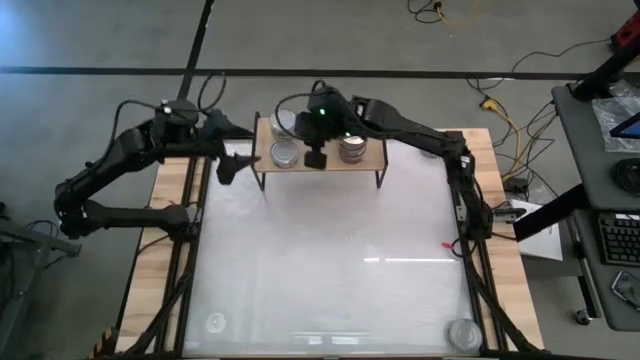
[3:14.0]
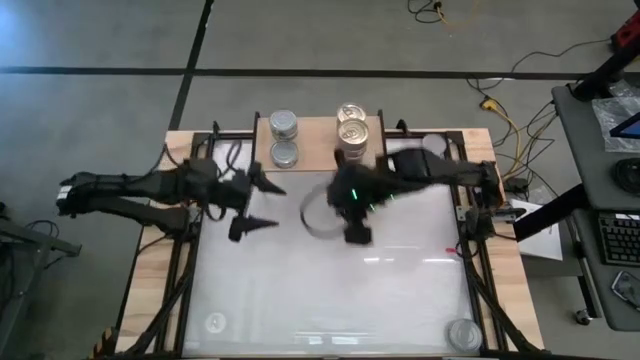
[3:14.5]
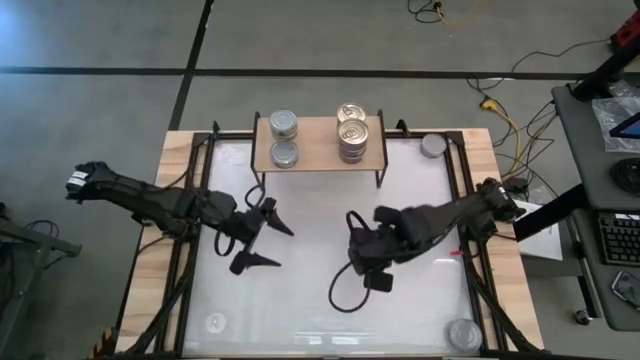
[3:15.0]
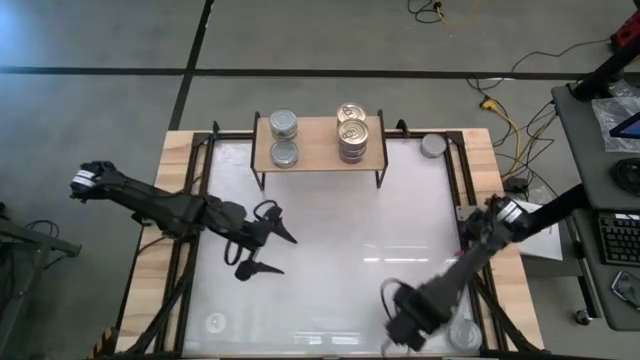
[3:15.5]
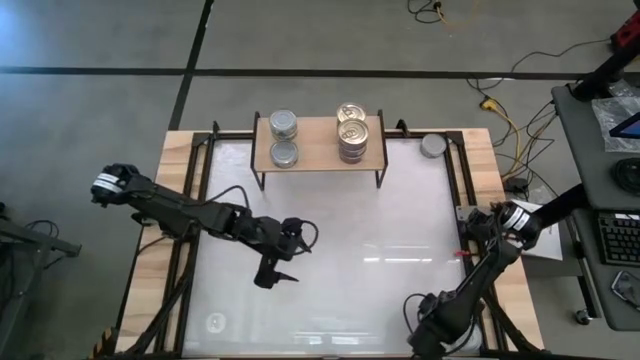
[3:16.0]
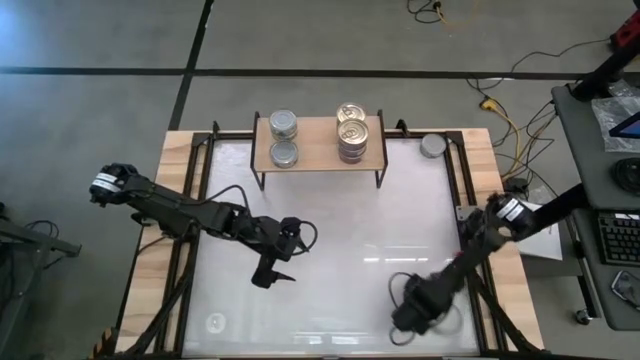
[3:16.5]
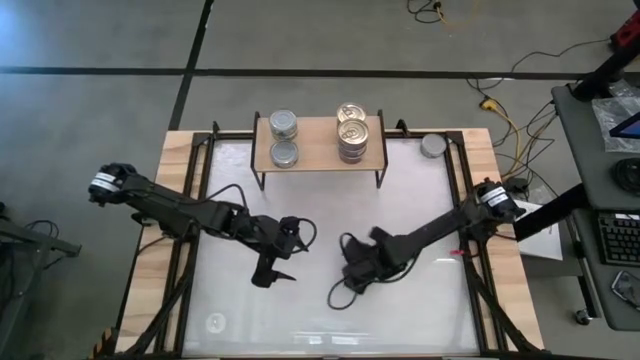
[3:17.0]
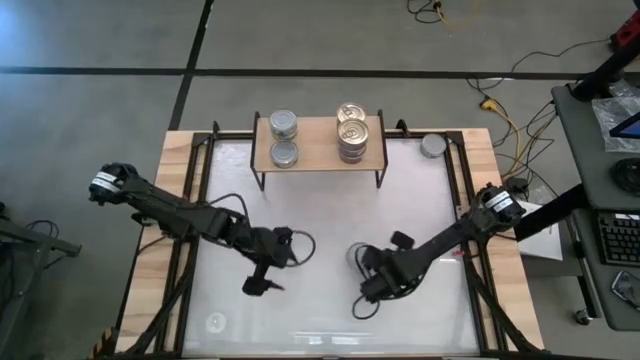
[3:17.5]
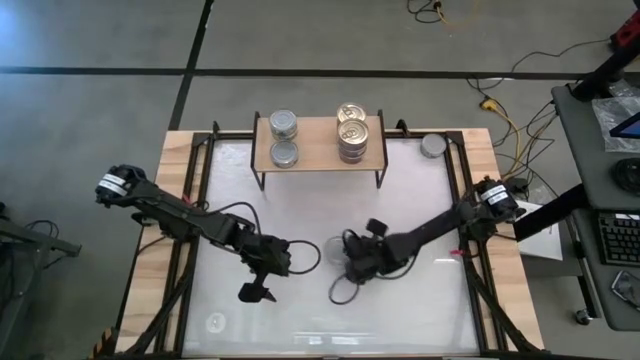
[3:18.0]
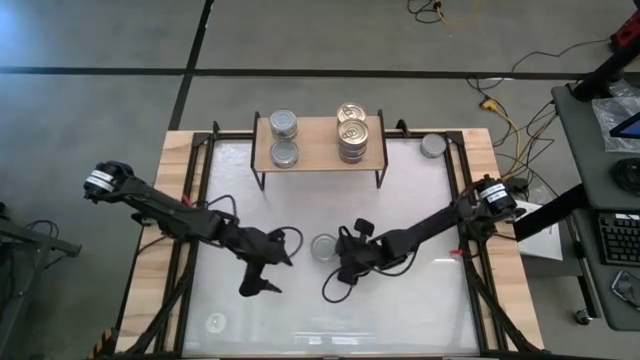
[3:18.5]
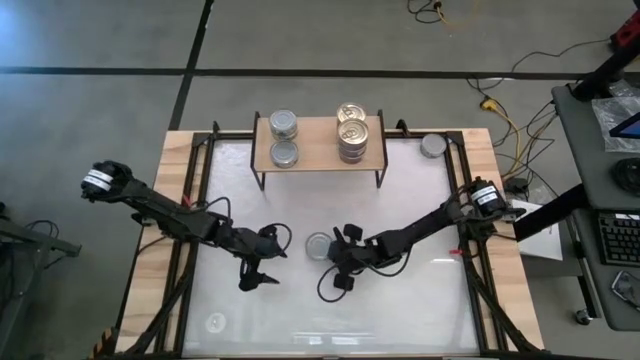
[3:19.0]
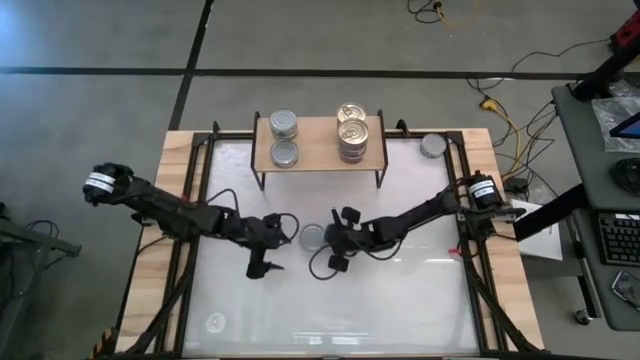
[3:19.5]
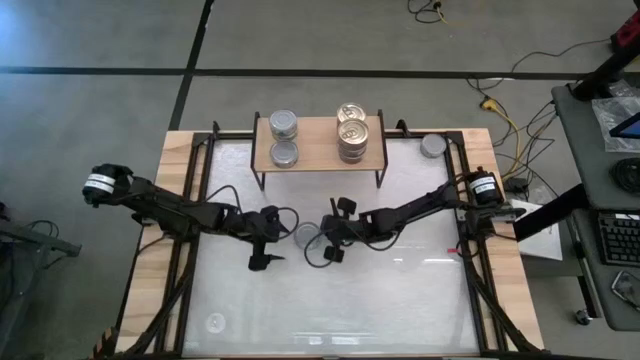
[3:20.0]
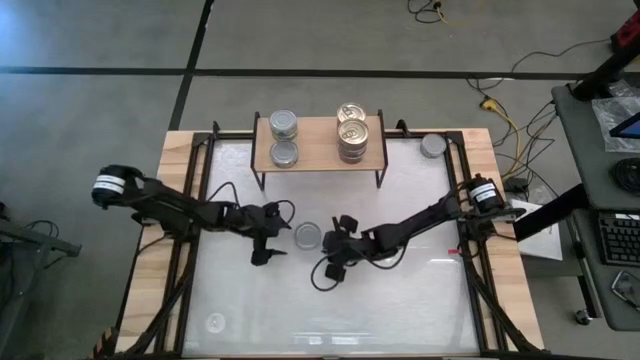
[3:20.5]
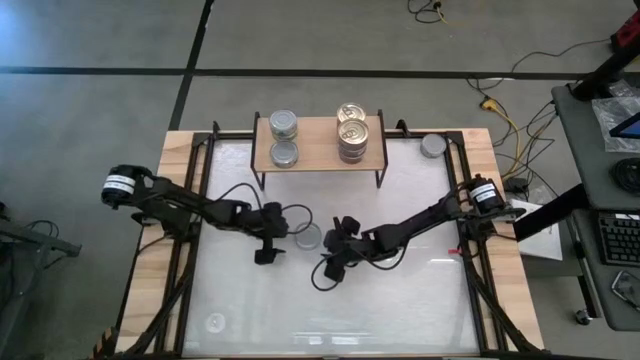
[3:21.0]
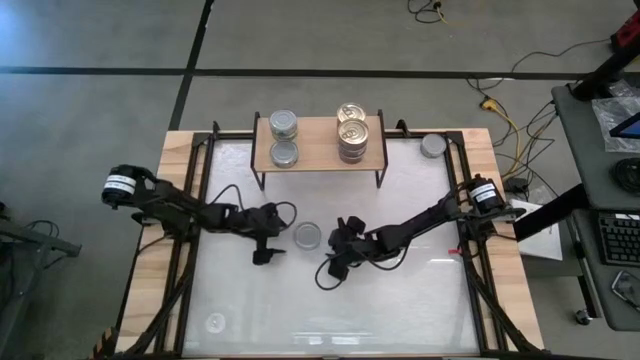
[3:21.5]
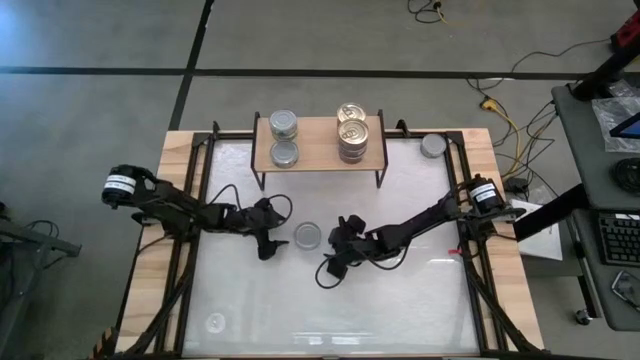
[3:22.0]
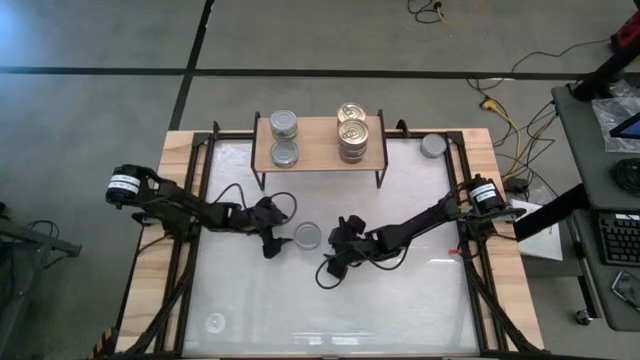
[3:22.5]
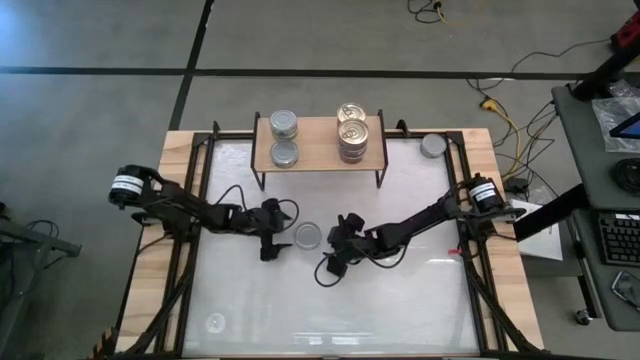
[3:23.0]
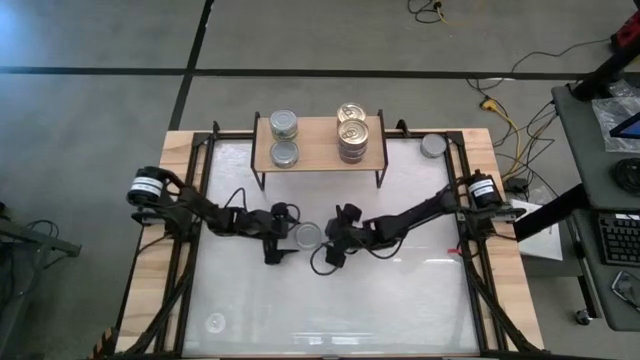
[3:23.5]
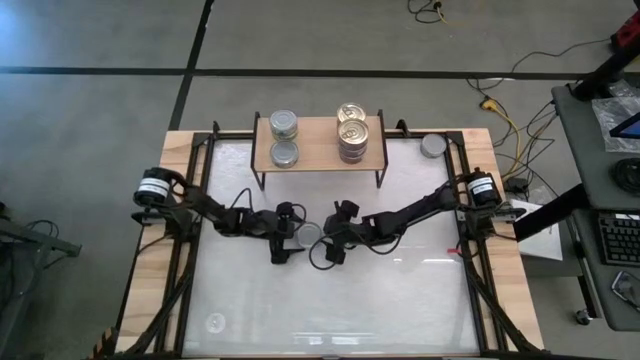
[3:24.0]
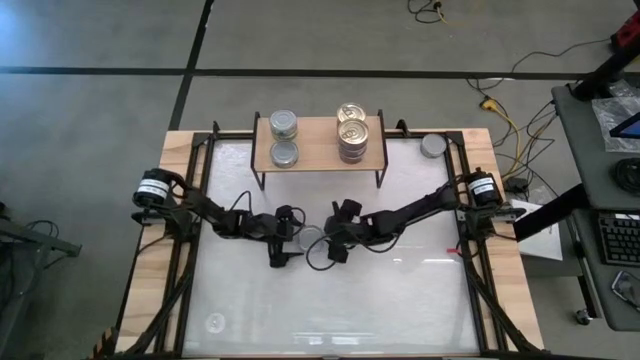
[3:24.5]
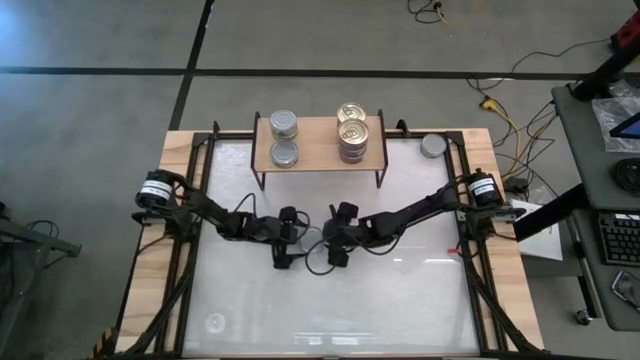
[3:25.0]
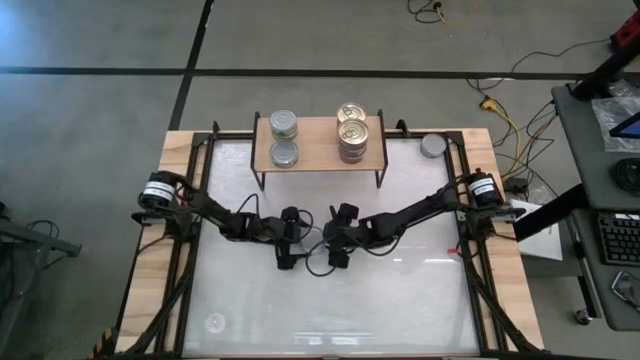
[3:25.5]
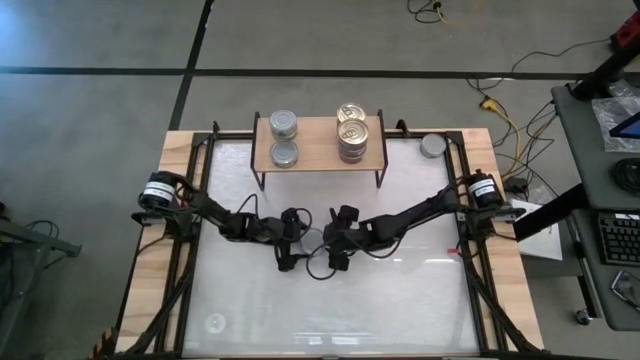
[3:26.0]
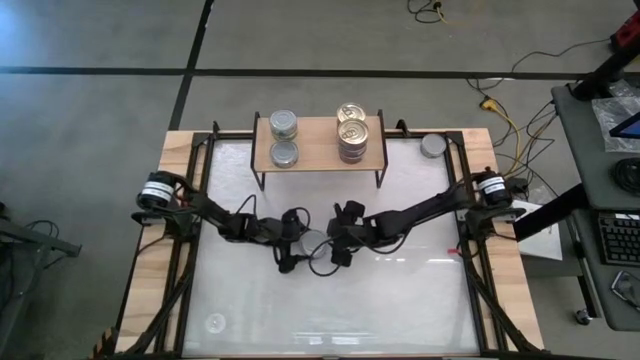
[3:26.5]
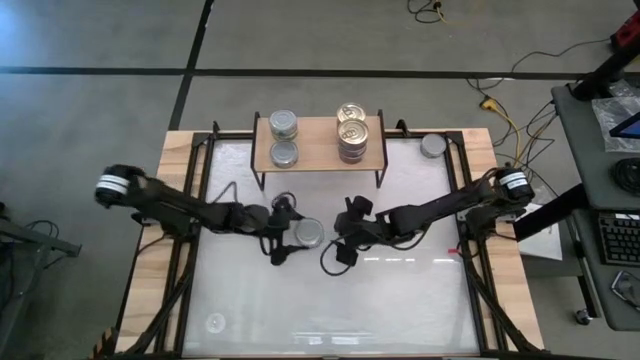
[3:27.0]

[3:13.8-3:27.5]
Task: Stack canned seafood by type on shelf
Stack the green tuna can on top of the other green tuna can on the shelf

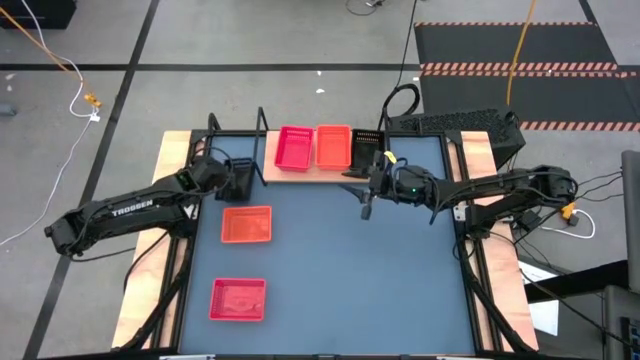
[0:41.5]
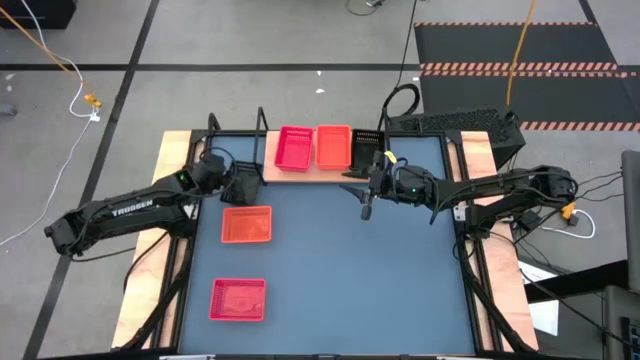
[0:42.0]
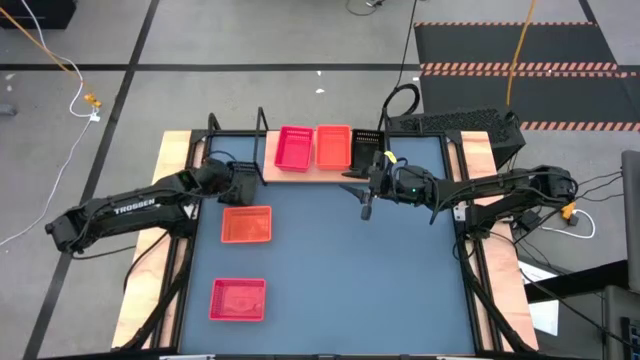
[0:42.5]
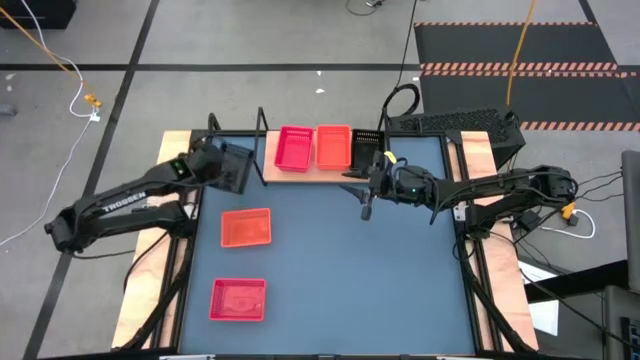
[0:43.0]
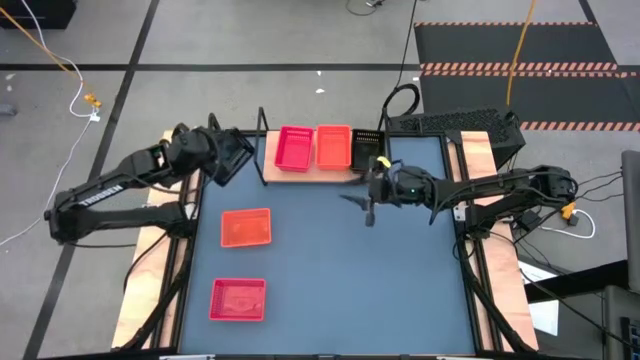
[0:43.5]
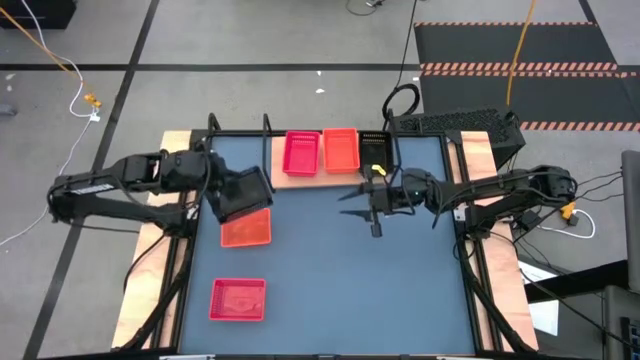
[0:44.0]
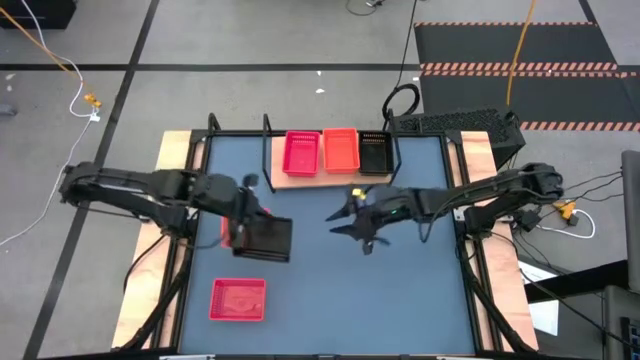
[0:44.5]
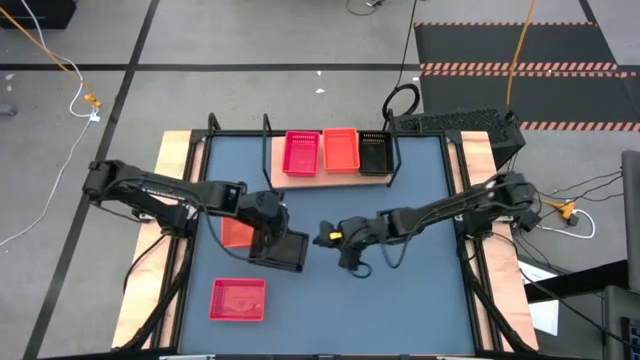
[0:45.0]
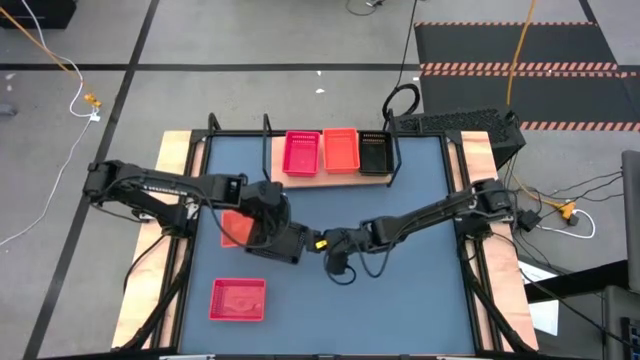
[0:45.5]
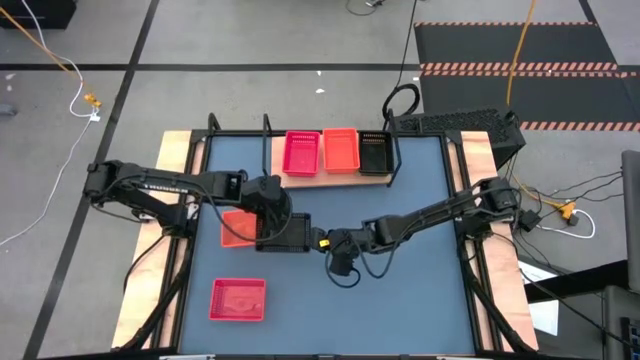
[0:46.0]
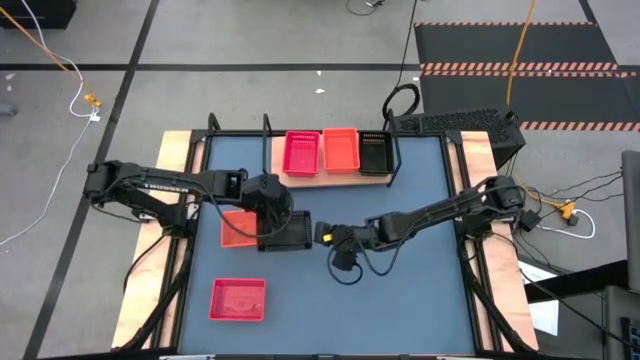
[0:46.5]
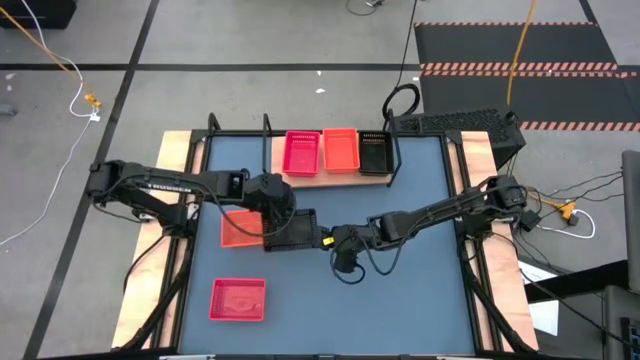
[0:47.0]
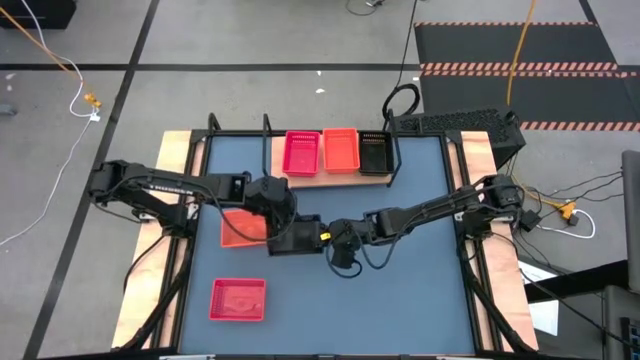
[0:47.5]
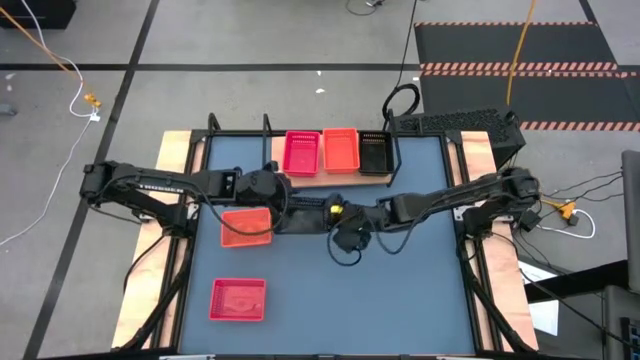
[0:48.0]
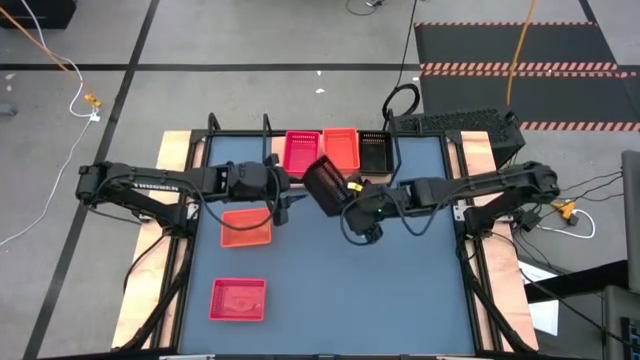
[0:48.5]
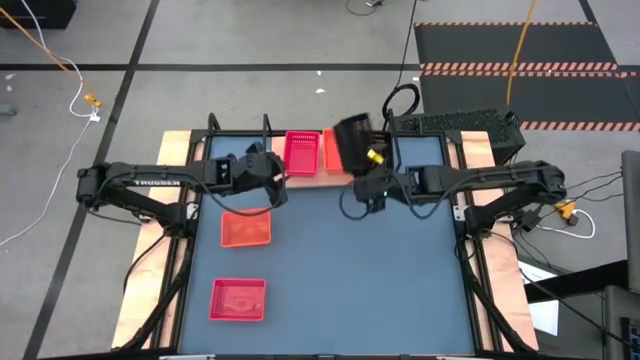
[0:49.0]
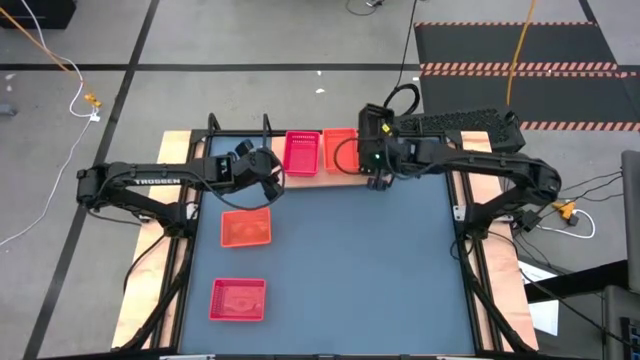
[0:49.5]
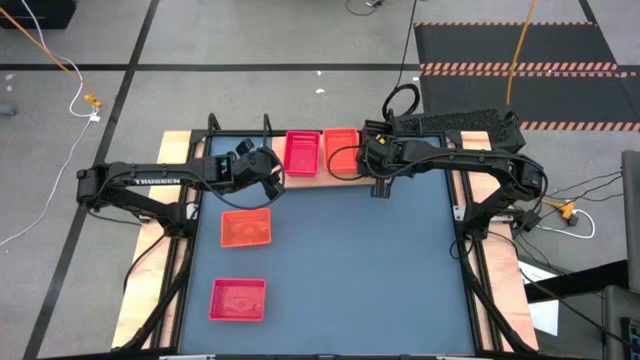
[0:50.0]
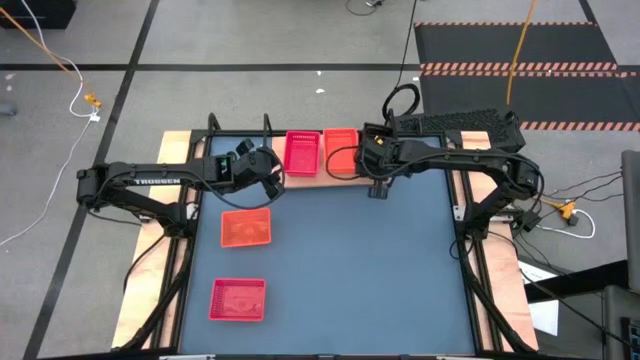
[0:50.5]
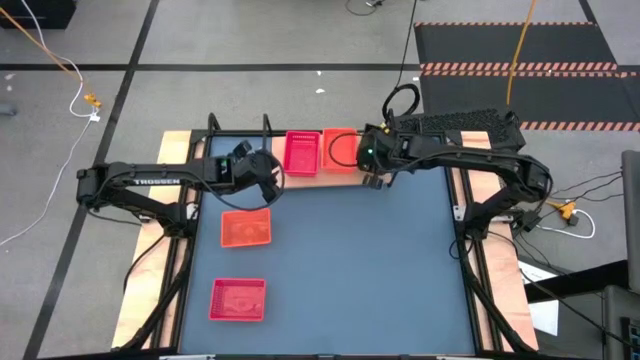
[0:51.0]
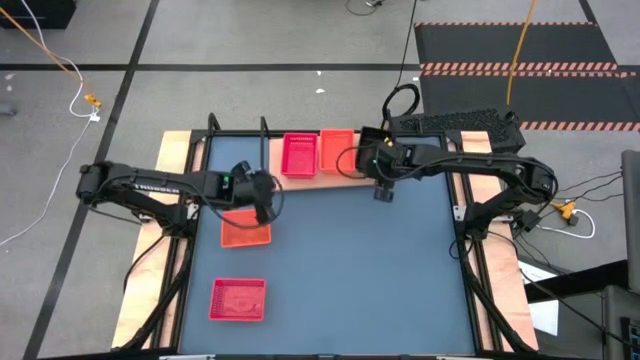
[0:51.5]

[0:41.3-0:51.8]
Task: Stack baskets on shelf by color
Stack the black bin on the black bin on the shelf
